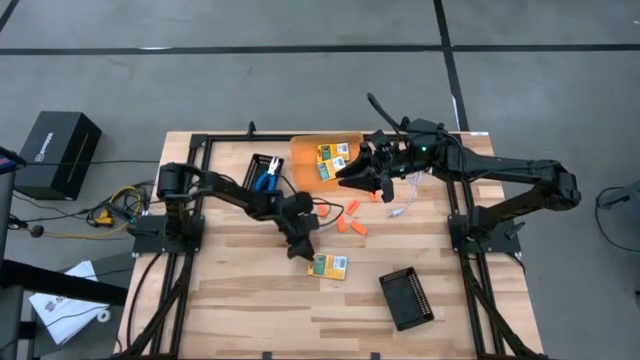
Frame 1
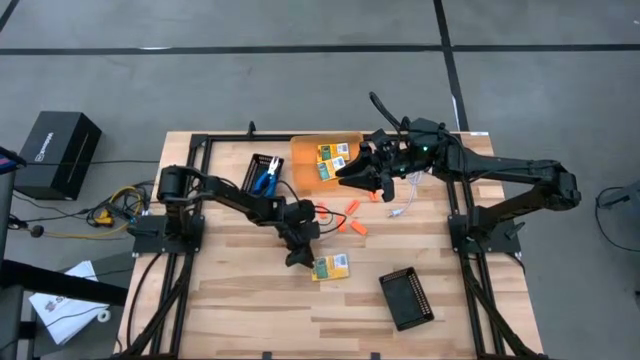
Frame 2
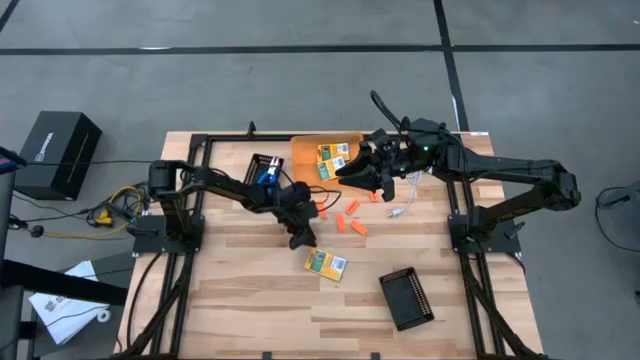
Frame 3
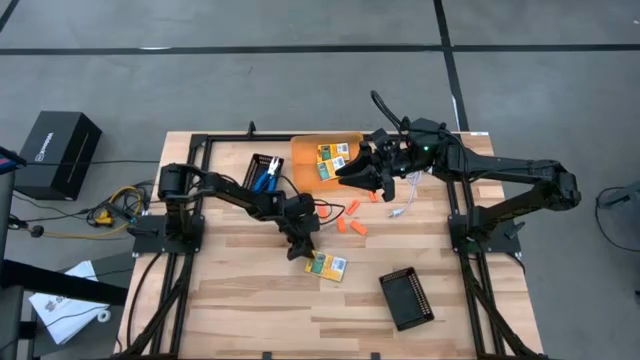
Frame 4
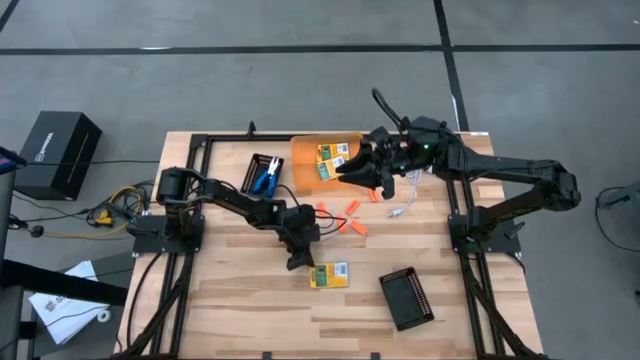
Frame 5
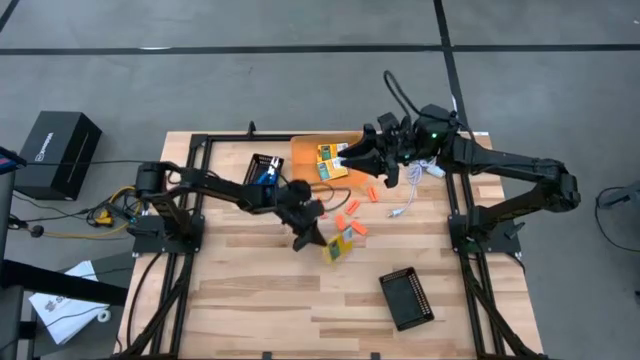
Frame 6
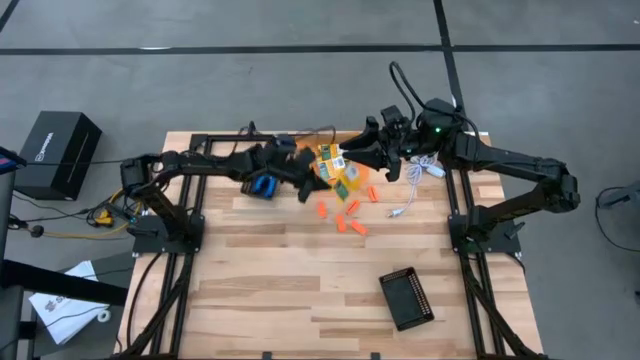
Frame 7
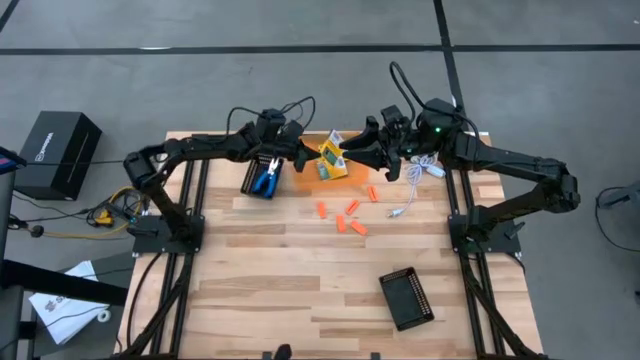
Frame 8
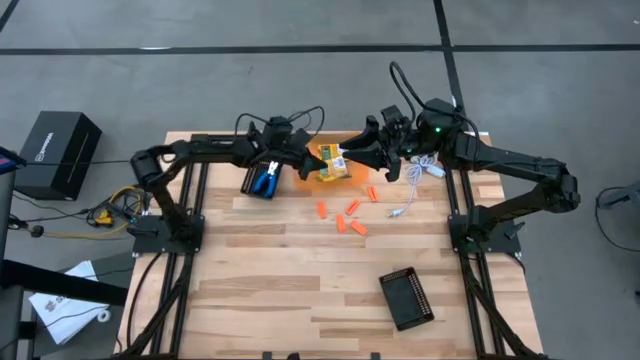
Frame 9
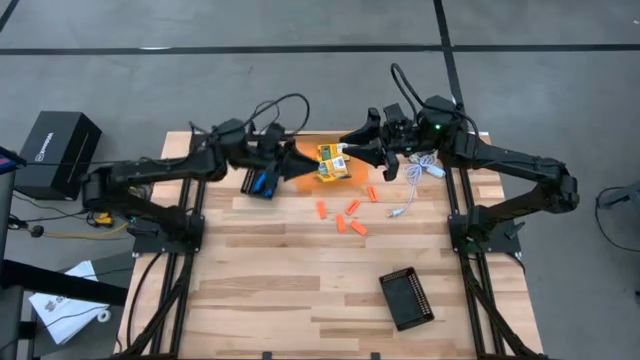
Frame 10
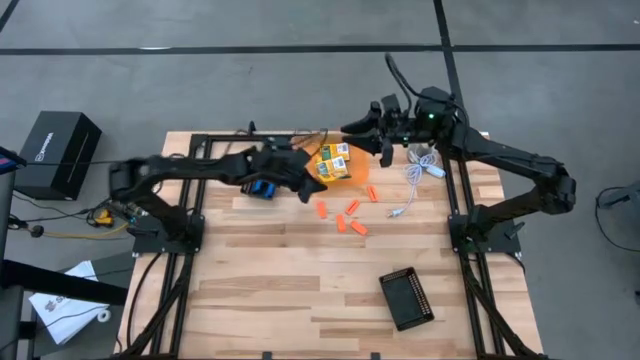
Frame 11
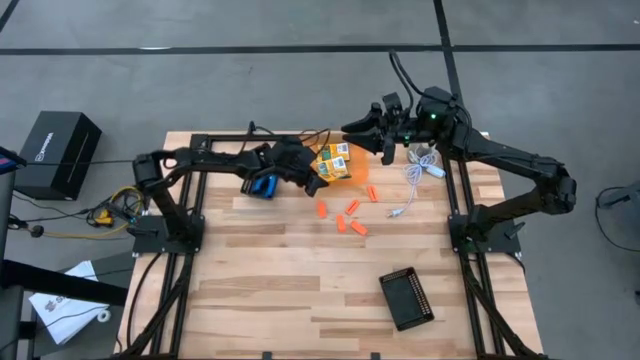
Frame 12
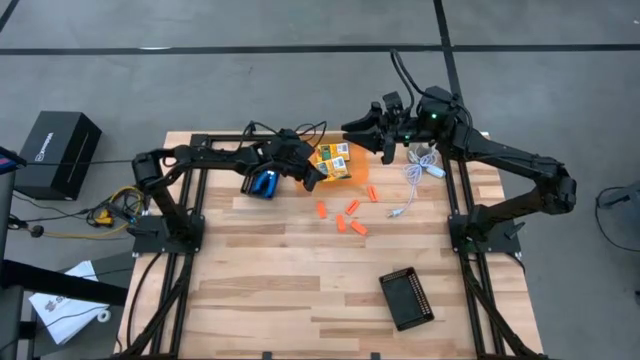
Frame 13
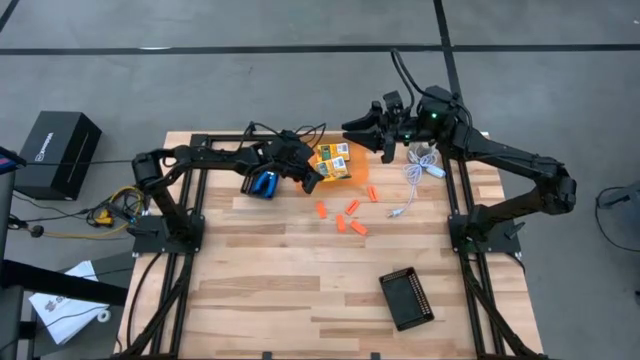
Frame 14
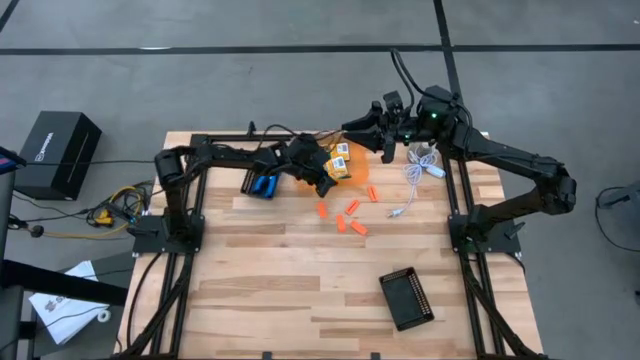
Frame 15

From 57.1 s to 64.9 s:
Task: Pick & Place School Supplies
Put the yellow crayon box into the orange bin

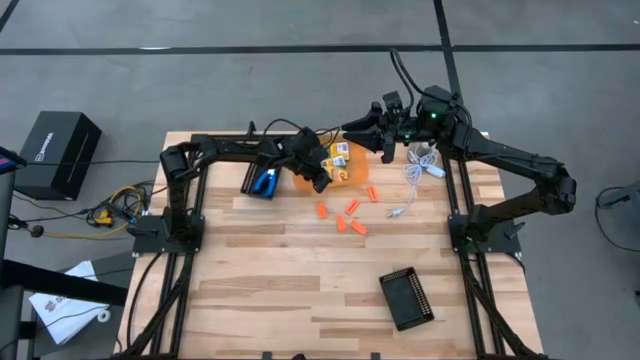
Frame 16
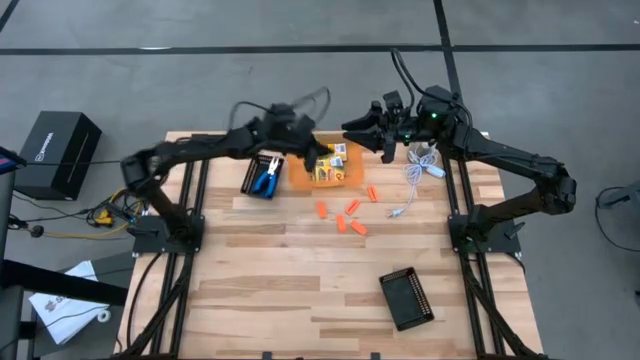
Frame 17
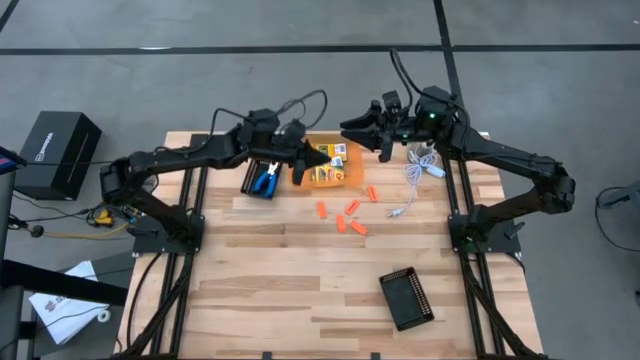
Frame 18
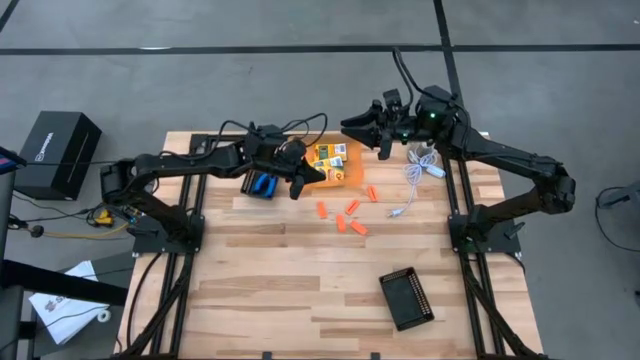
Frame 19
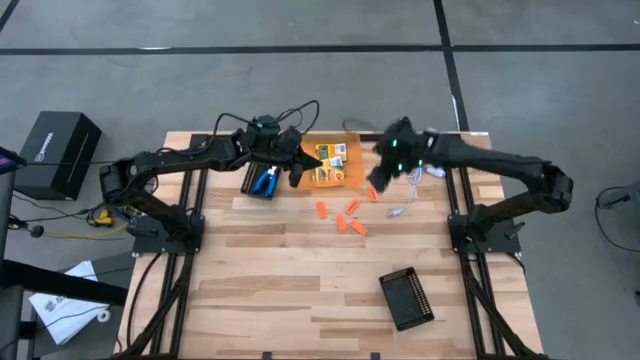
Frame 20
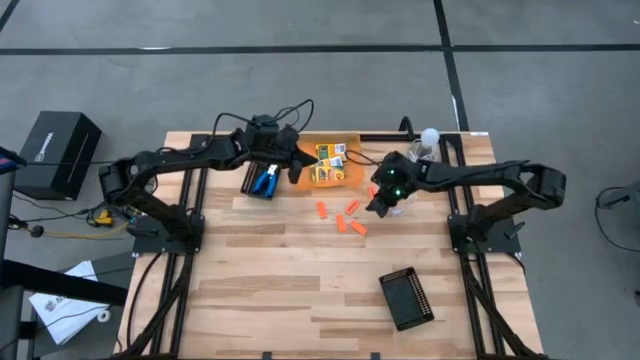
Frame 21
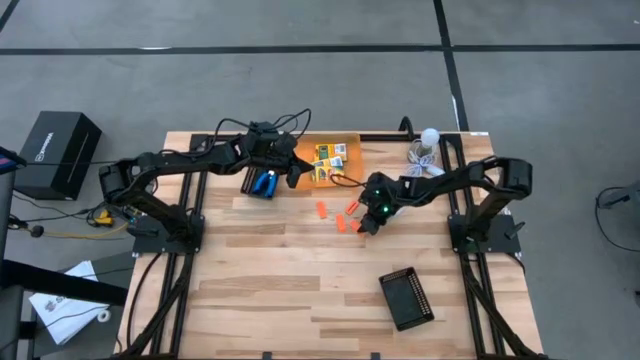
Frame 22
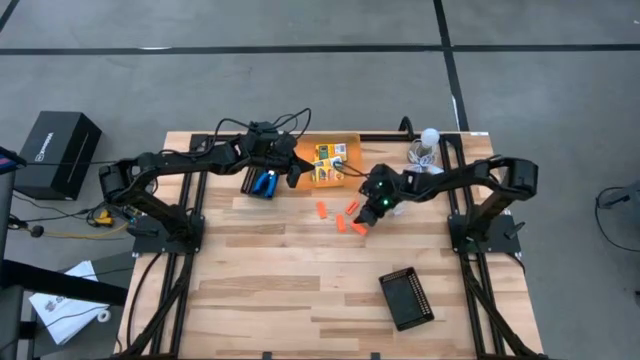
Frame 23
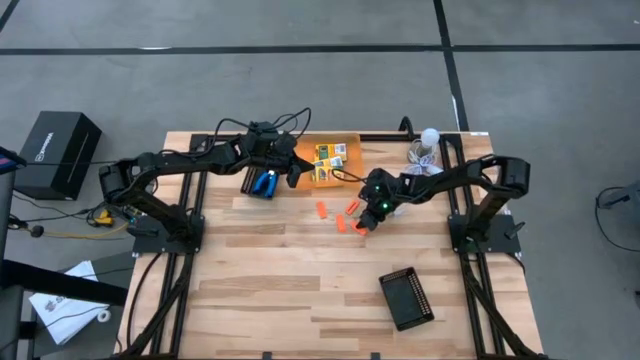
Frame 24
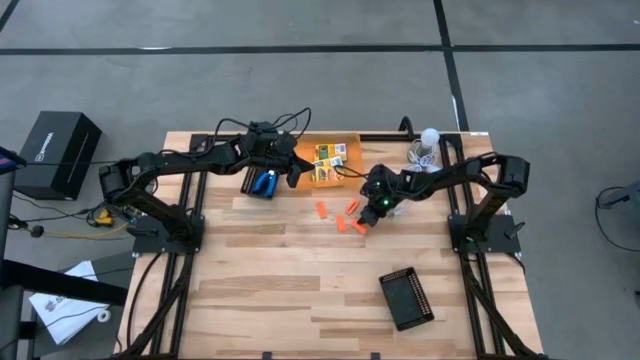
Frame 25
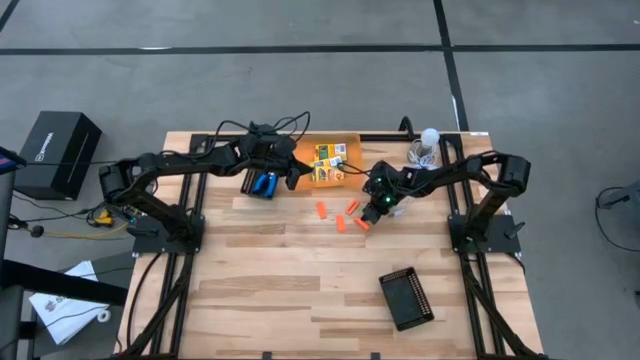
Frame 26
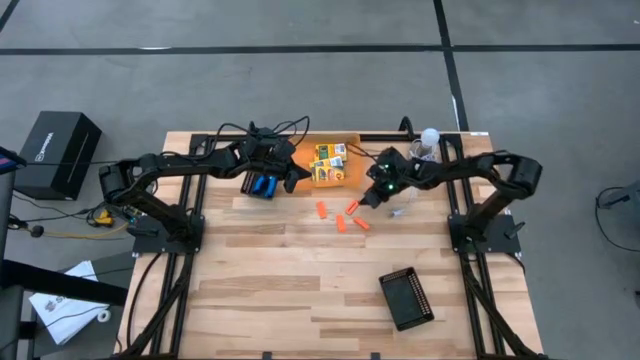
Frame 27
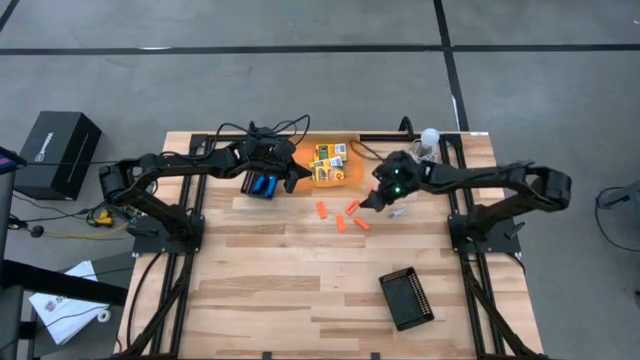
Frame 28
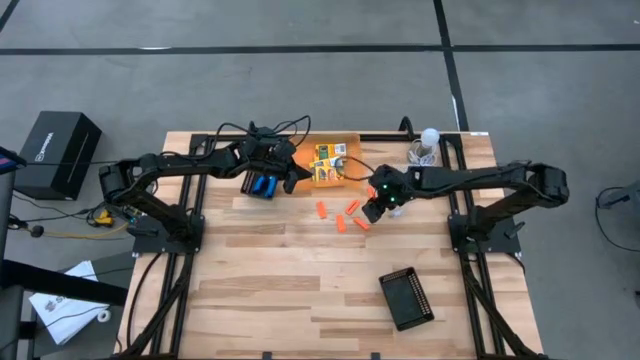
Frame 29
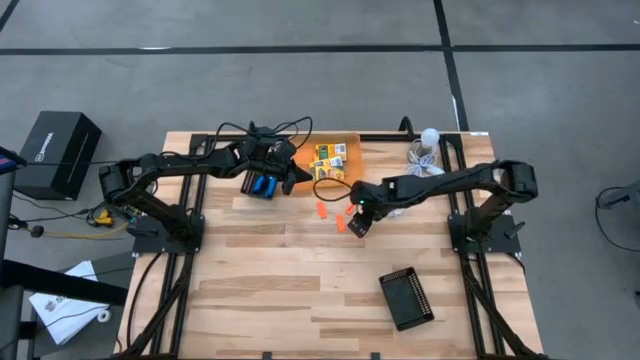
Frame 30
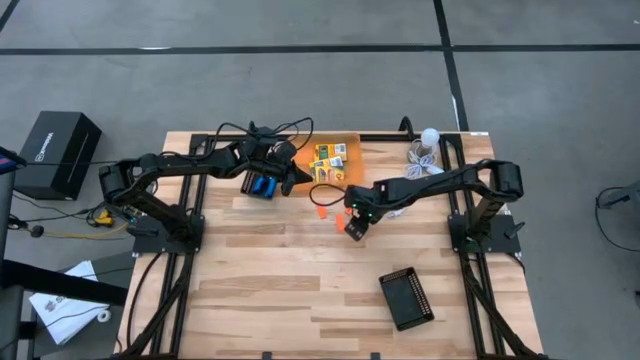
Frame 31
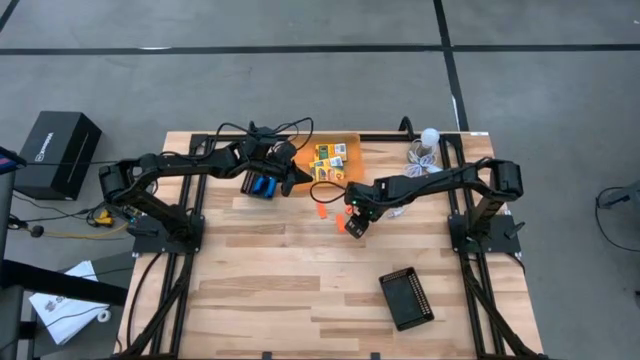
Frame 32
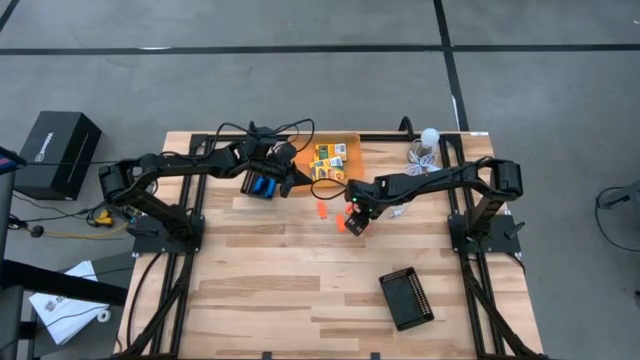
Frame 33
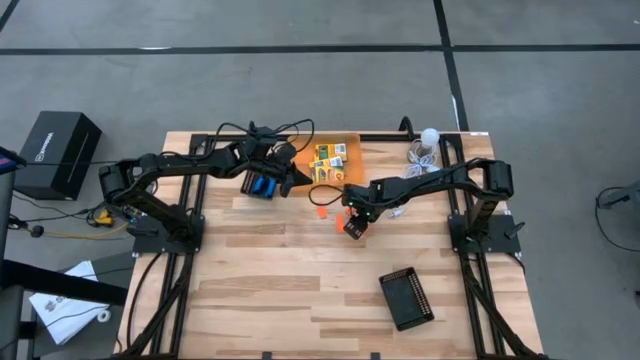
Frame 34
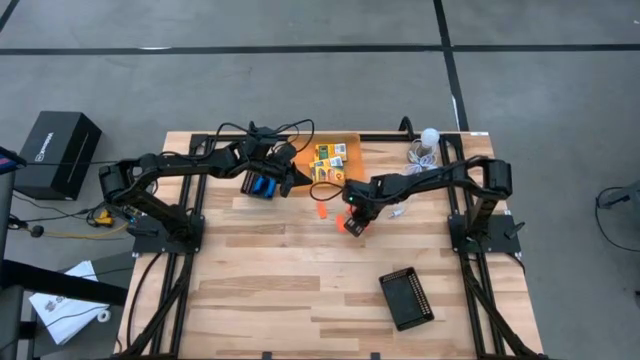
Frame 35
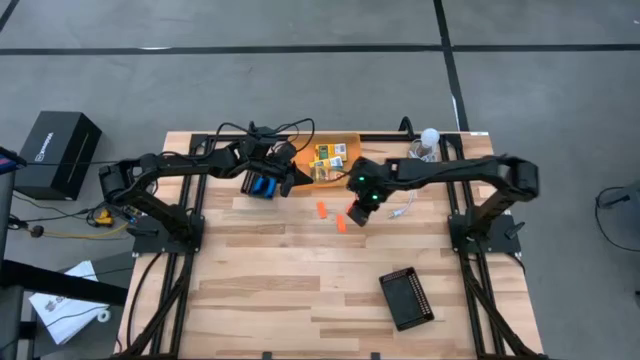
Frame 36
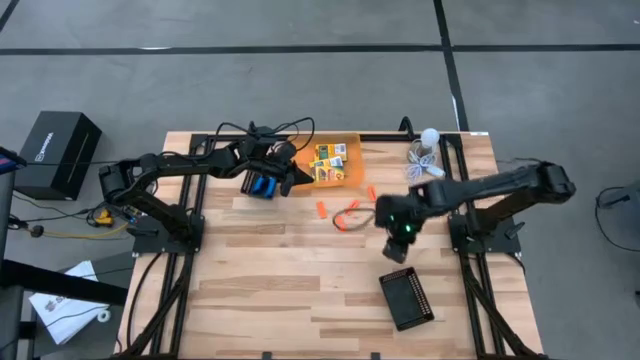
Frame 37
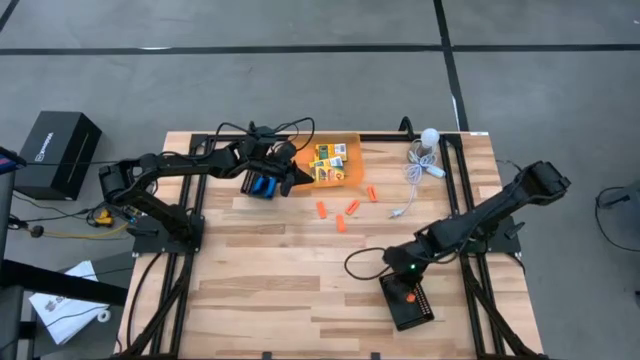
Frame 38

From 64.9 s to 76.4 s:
Put the orange eraser into the bottom black bin

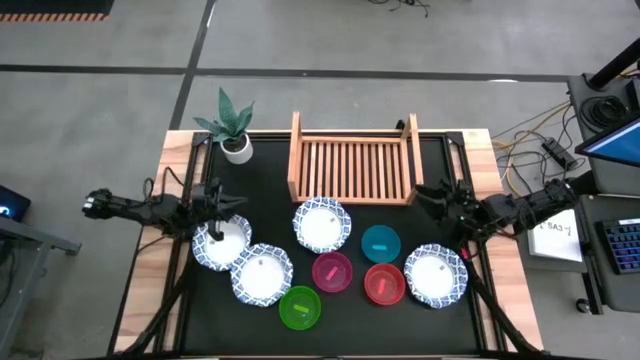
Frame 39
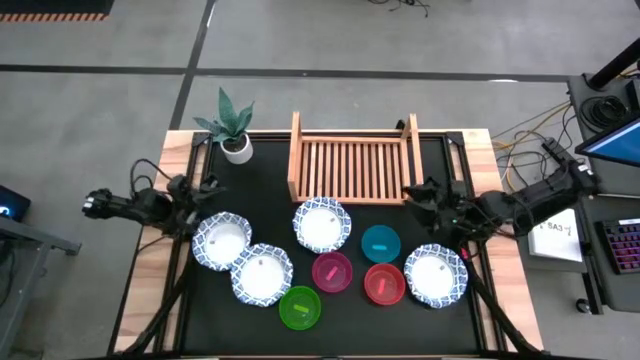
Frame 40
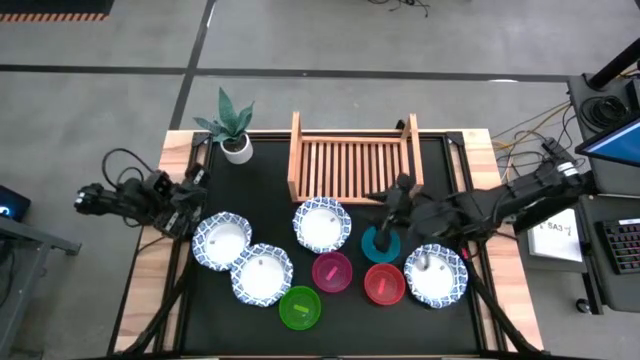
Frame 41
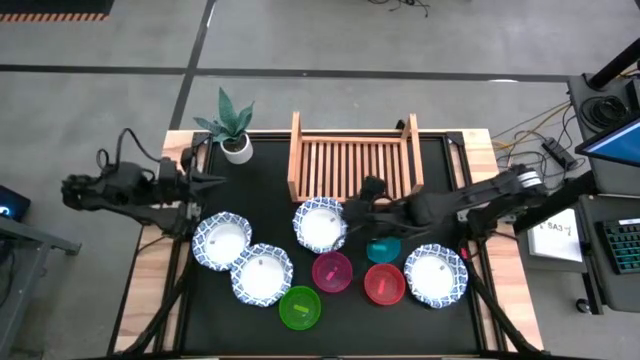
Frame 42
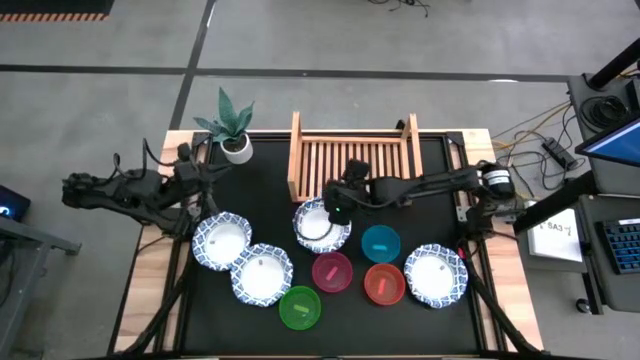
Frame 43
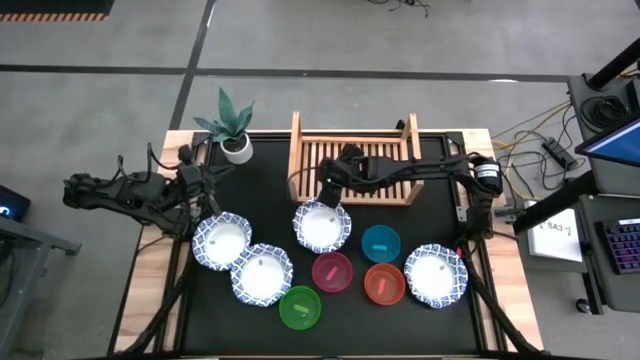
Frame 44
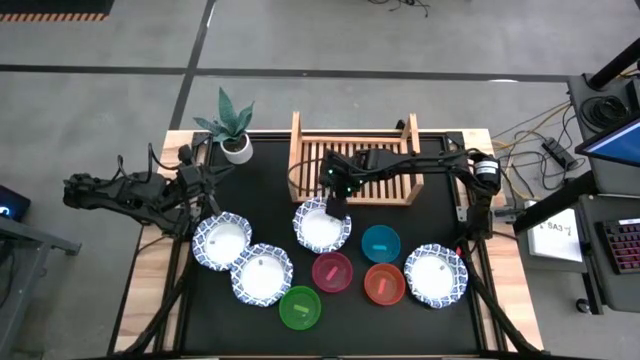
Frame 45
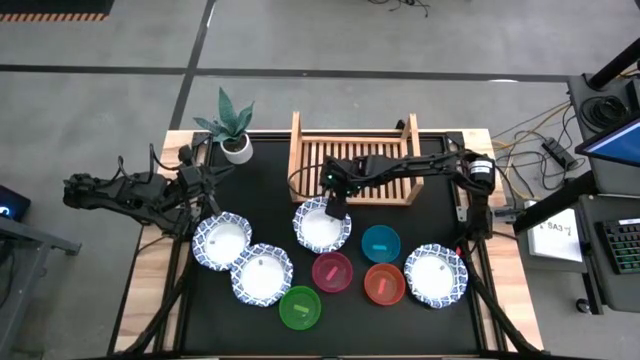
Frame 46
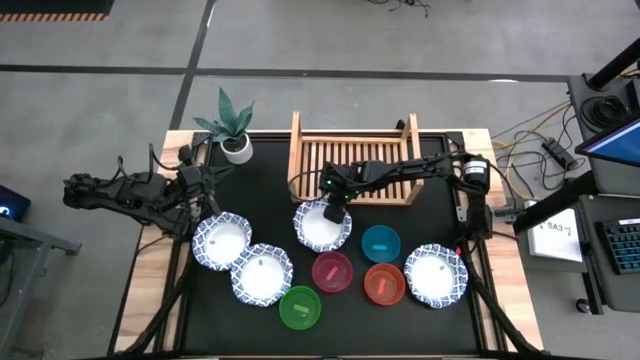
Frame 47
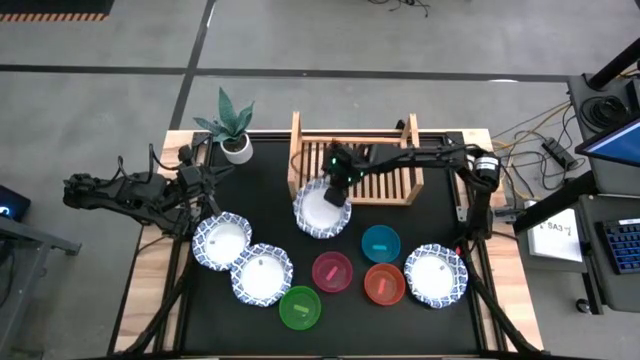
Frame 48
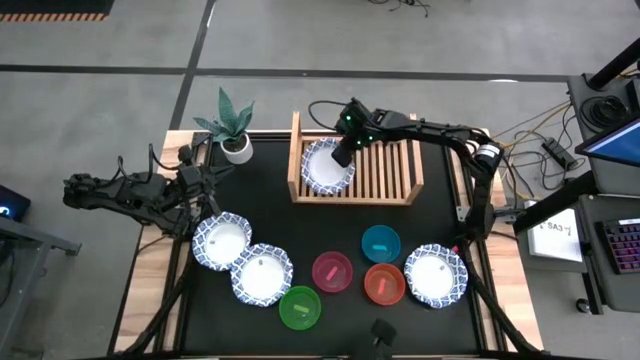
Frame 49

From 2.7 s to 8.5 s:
Task: Place and stack bowls onto a shelf
Put the blue patterned bowl on the shelf
